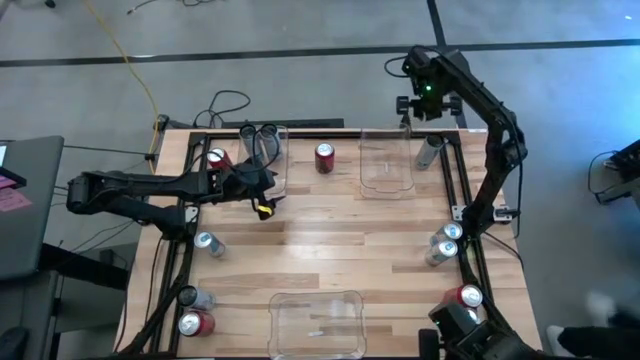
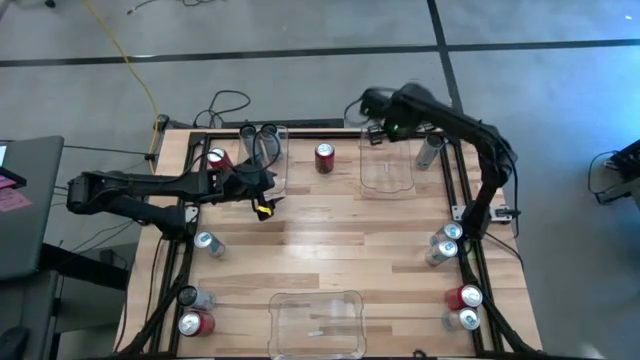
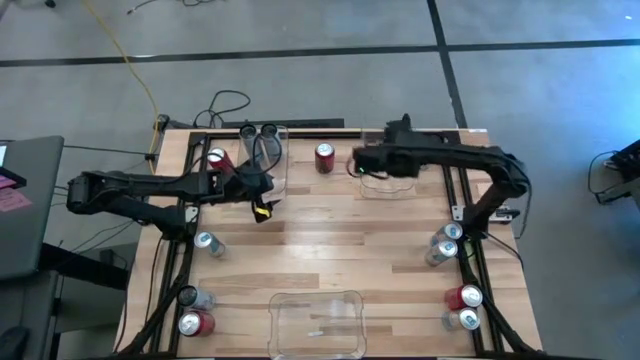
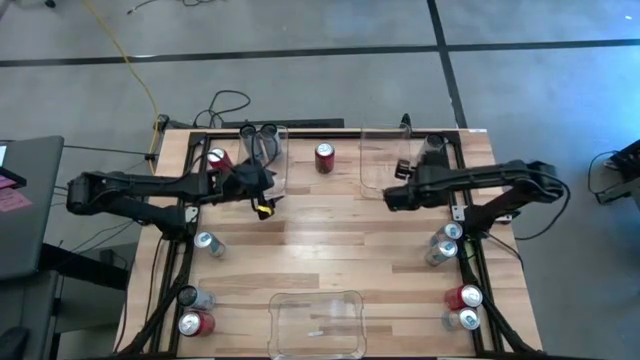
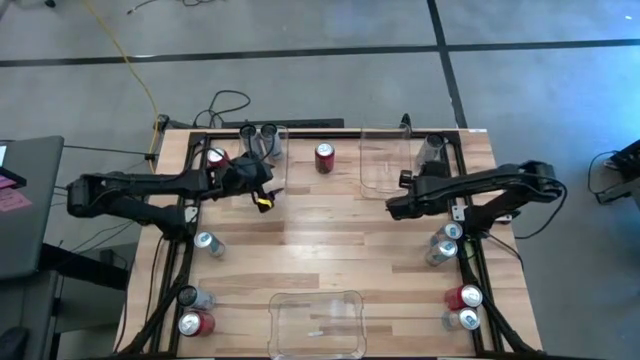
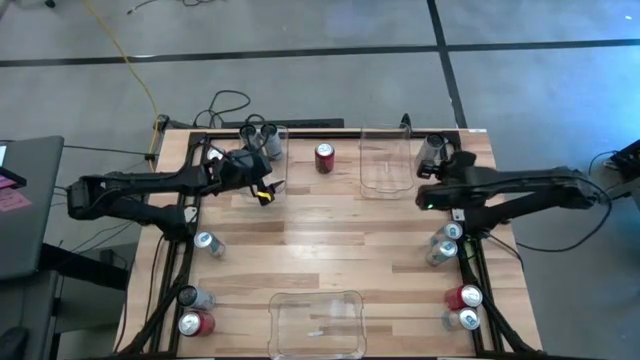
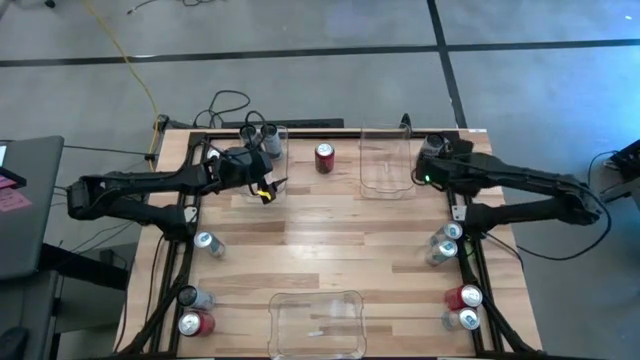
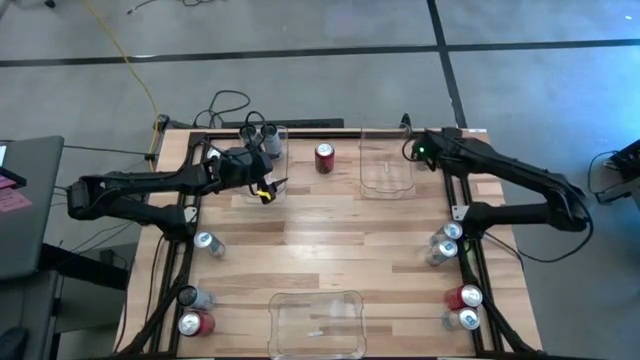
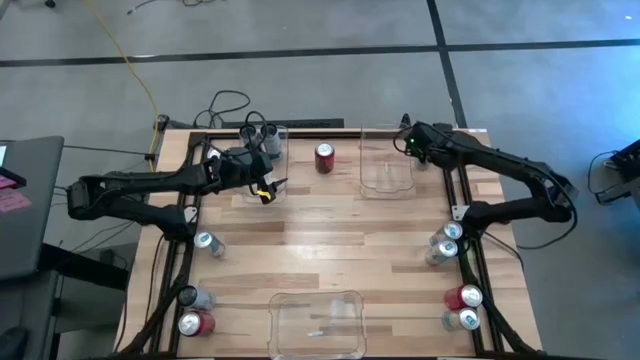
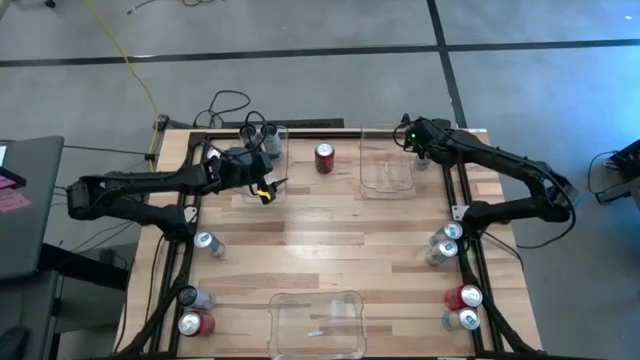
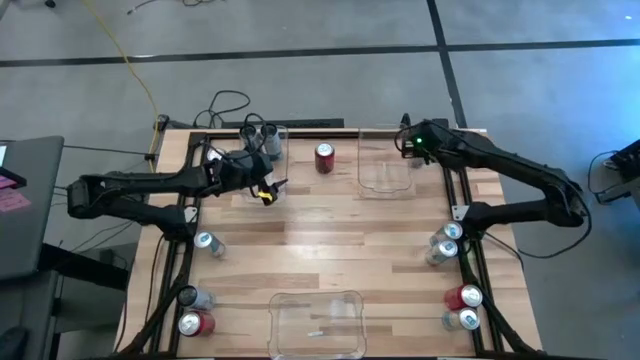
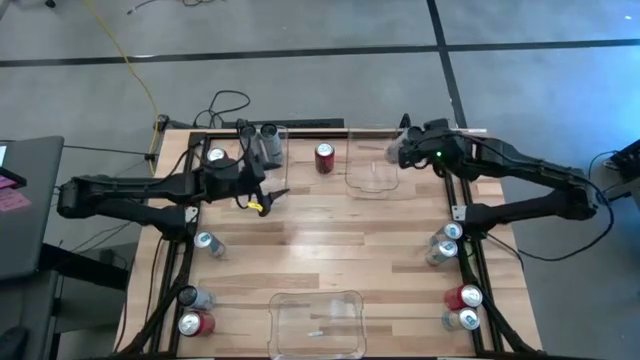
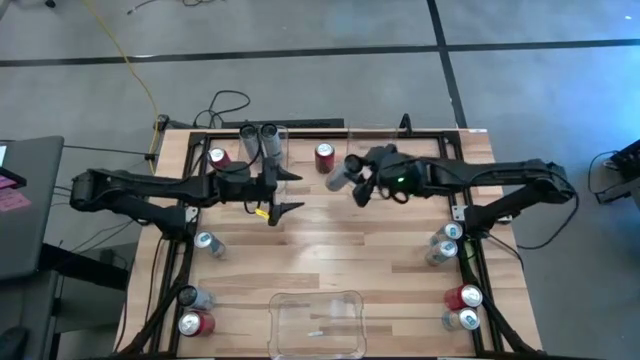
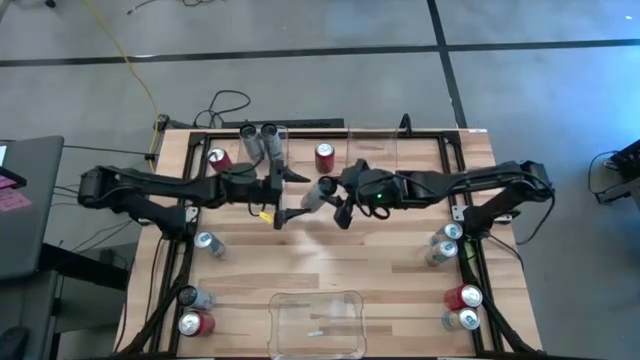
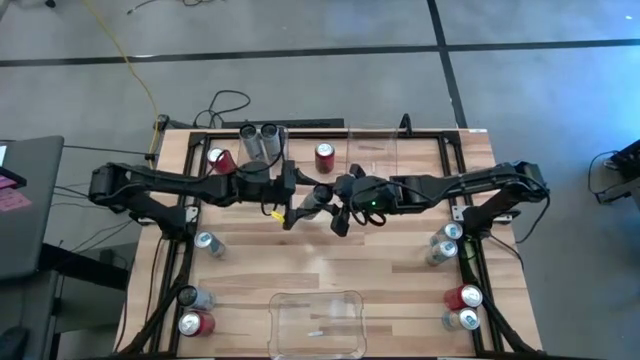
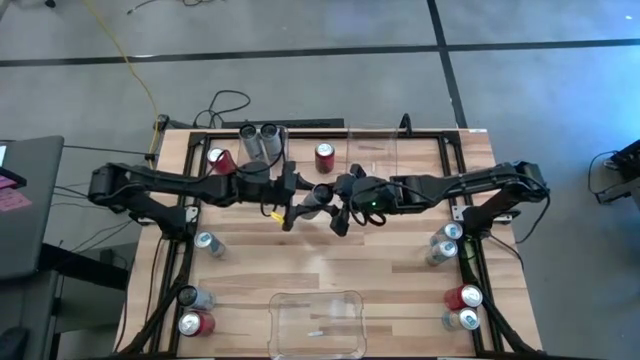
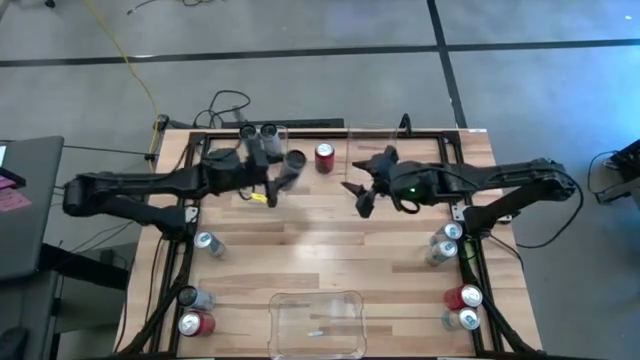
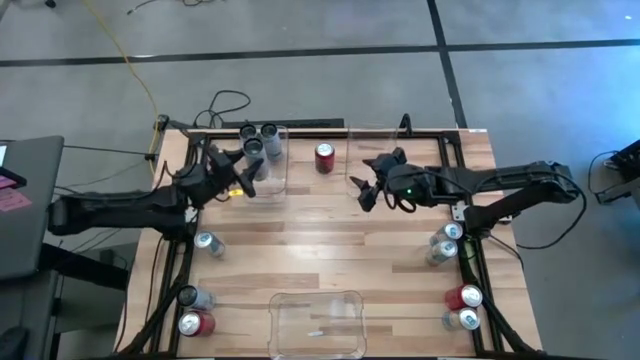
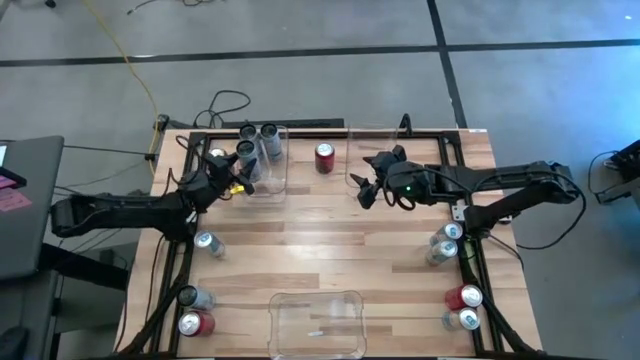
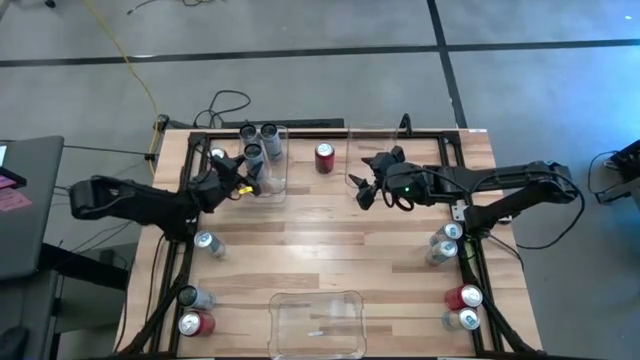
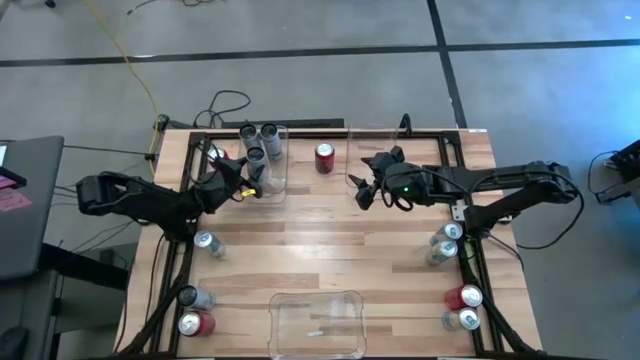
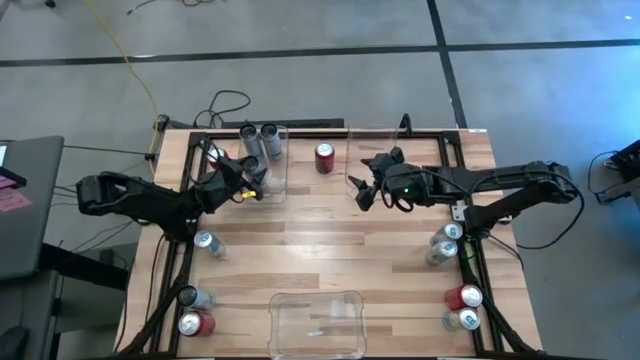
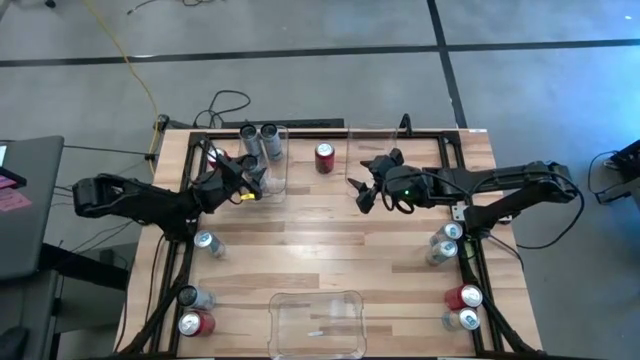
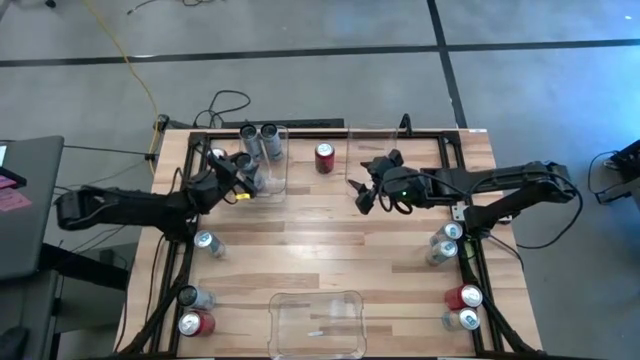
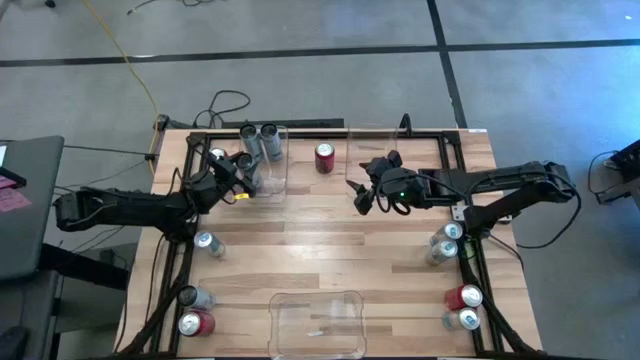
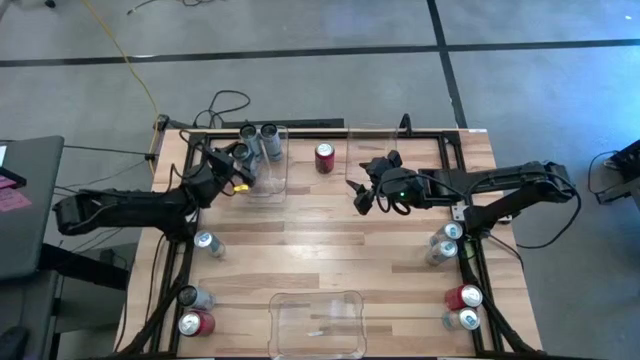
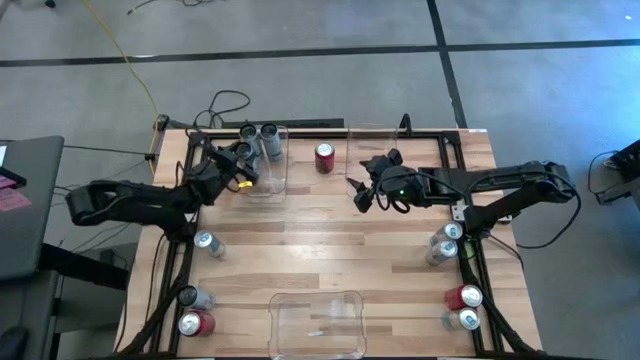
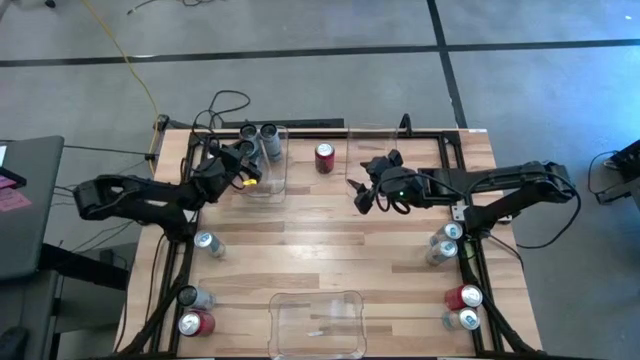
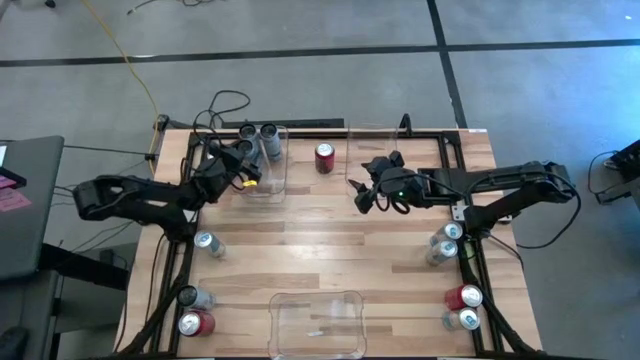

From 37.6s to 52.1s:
Task: Sort soda cans
Put the top white and blue soda can into the top left transparent bin

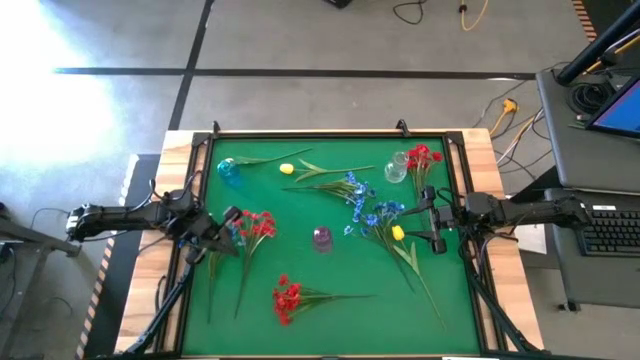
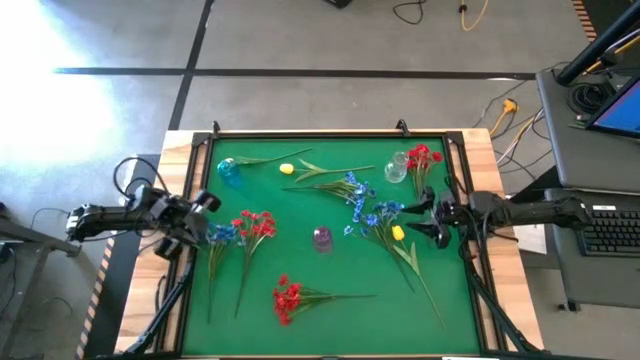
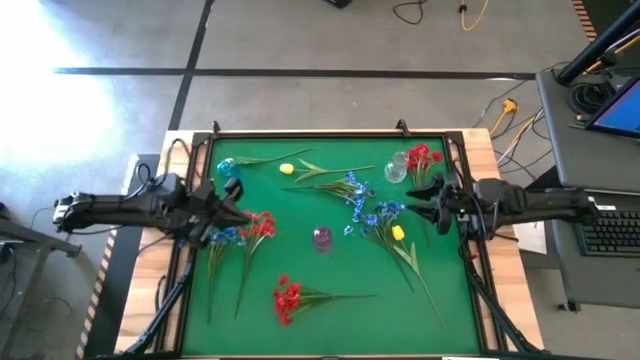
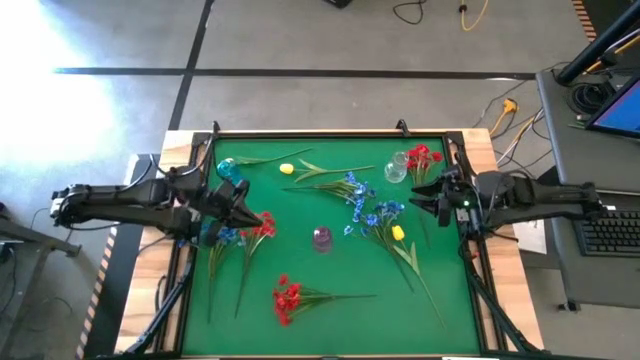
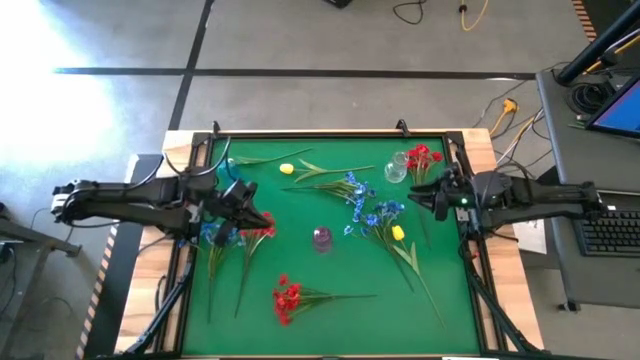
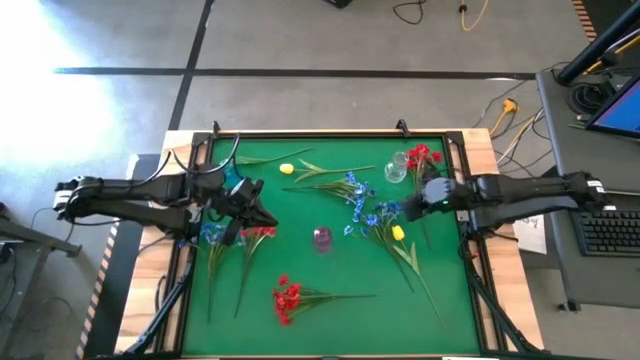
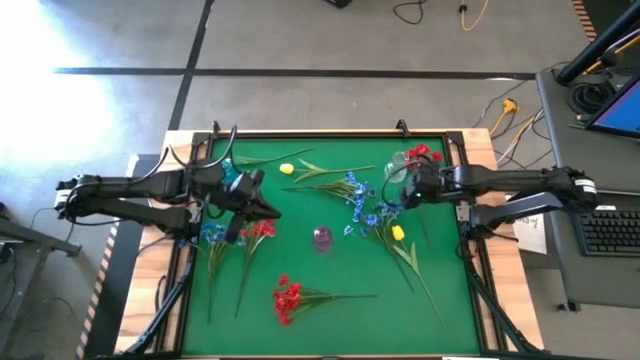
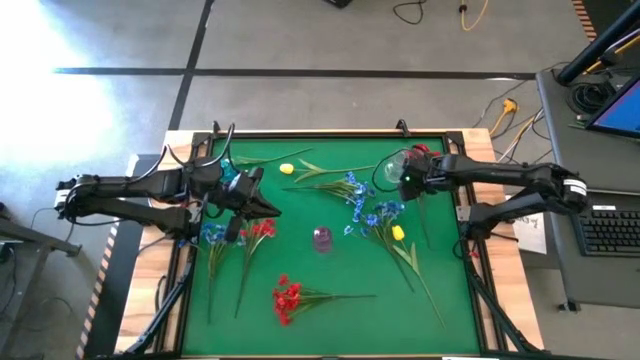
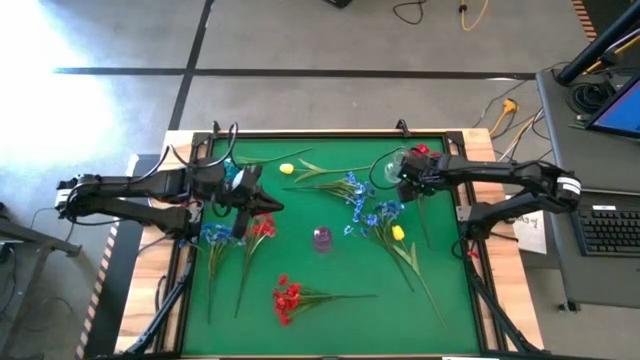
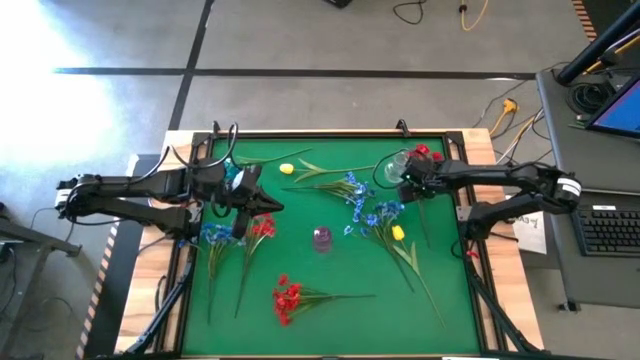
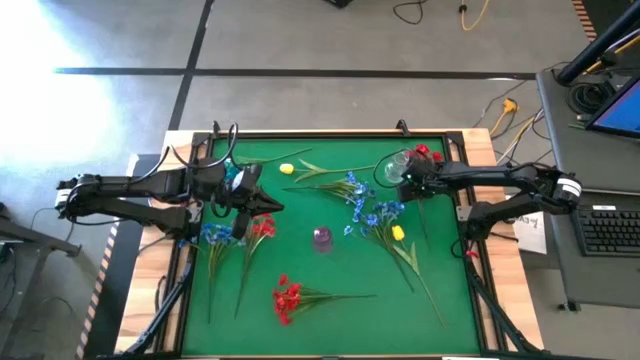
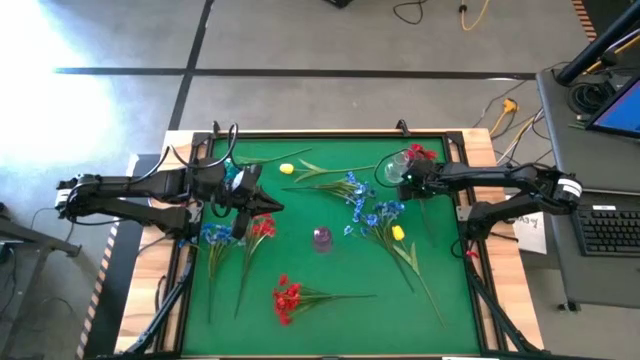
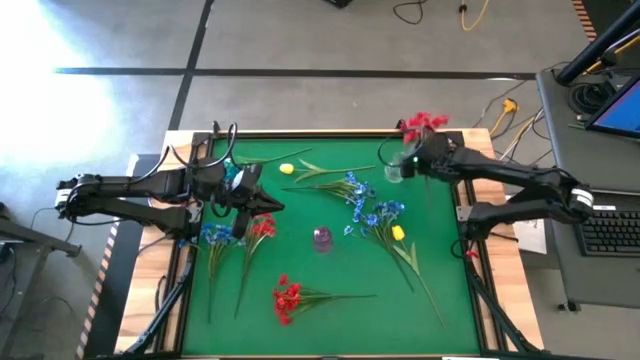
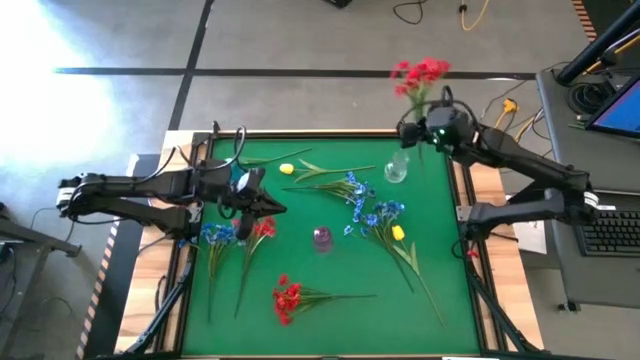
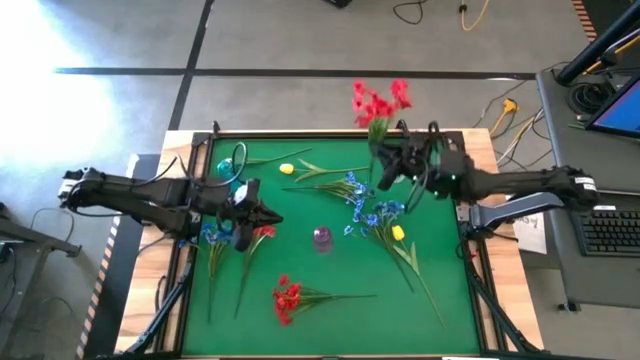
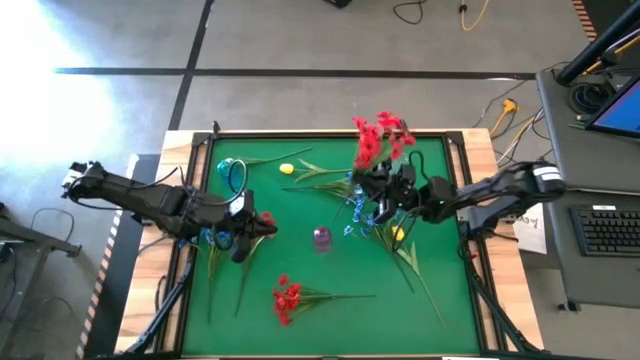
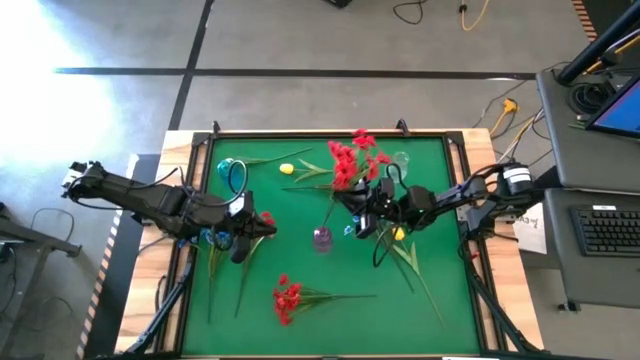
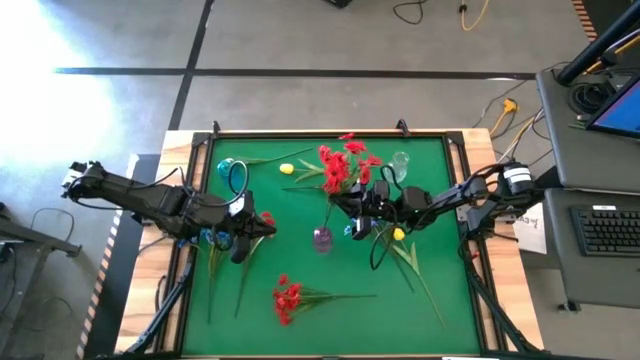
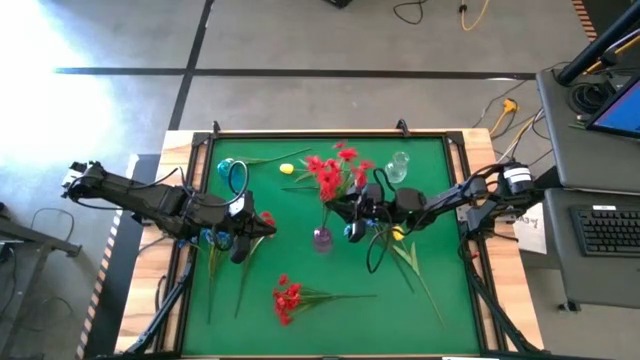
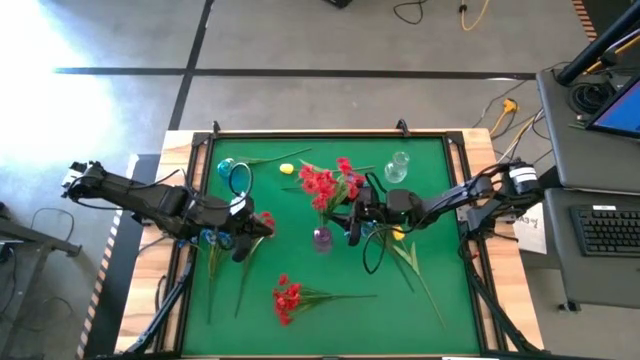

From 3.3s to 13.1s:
Task: Sort flowers into vase by color
Put the top right red flowers into the purple vase
